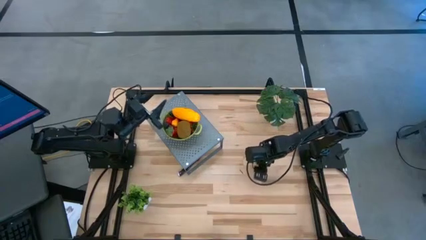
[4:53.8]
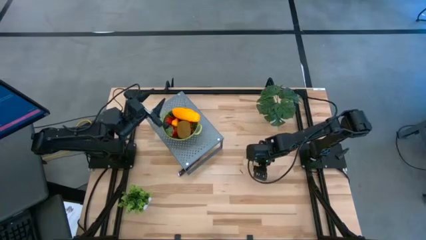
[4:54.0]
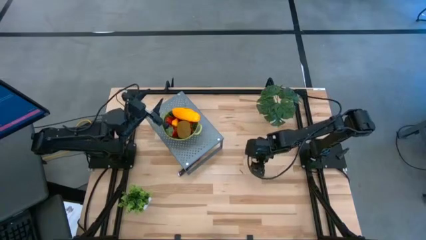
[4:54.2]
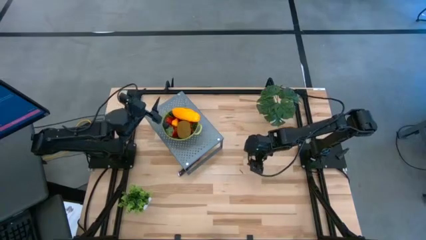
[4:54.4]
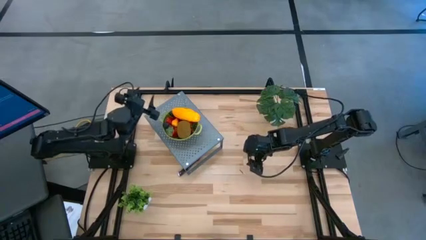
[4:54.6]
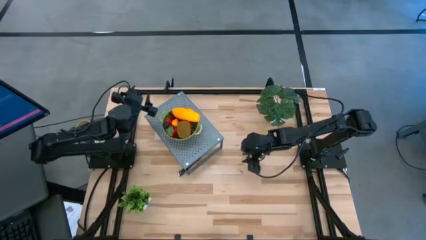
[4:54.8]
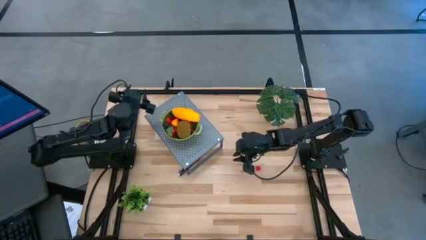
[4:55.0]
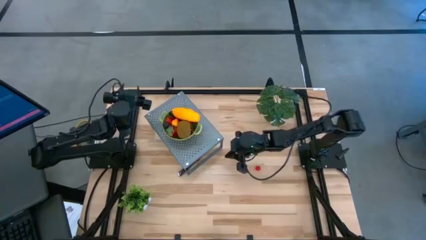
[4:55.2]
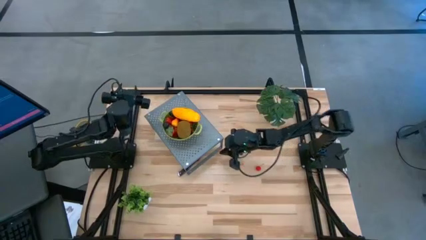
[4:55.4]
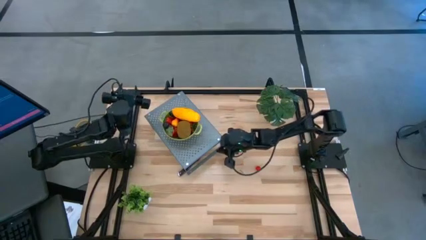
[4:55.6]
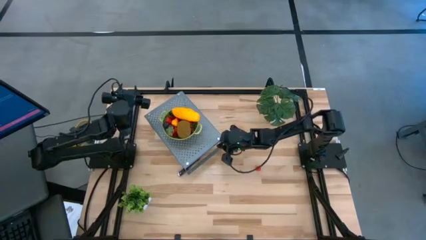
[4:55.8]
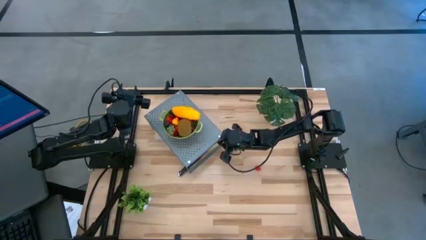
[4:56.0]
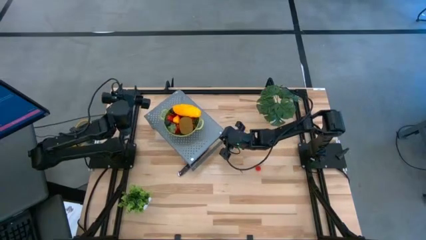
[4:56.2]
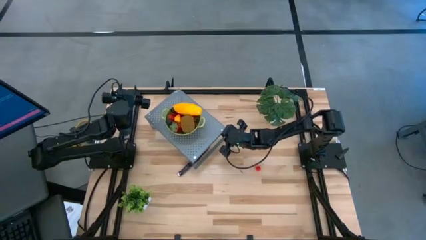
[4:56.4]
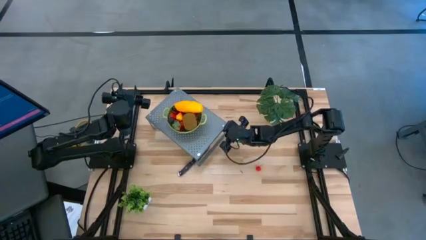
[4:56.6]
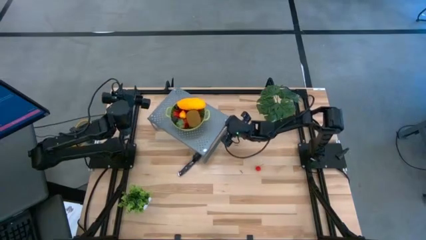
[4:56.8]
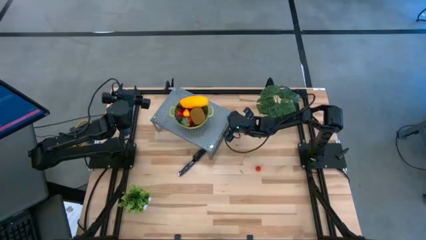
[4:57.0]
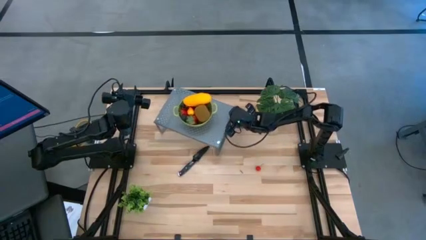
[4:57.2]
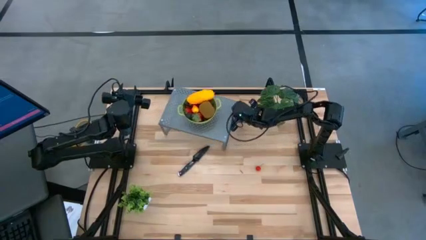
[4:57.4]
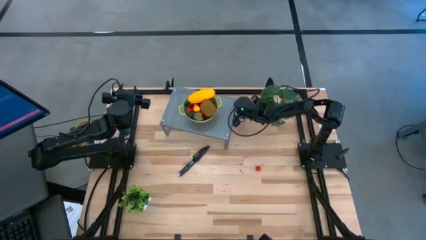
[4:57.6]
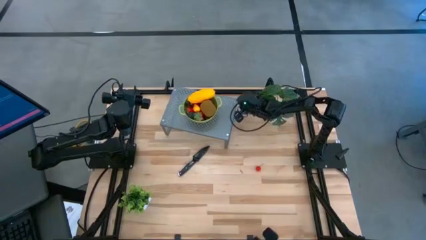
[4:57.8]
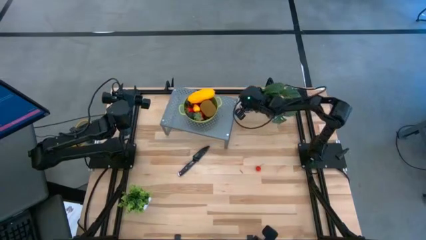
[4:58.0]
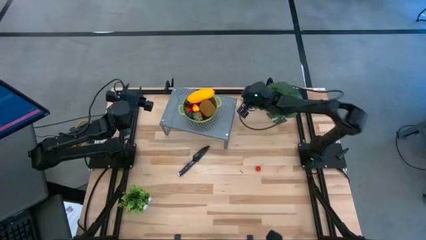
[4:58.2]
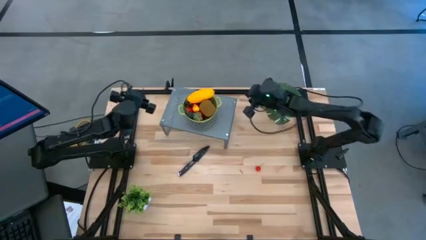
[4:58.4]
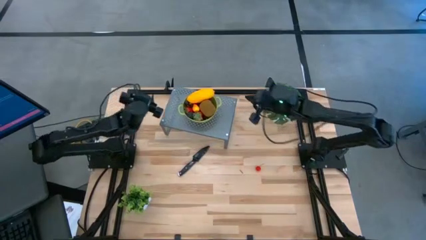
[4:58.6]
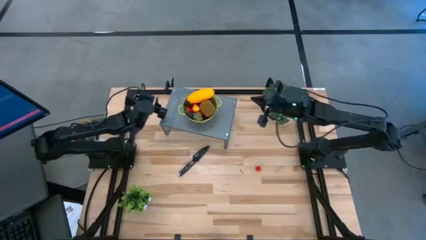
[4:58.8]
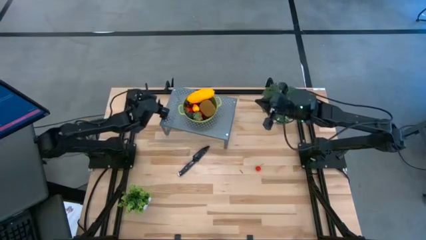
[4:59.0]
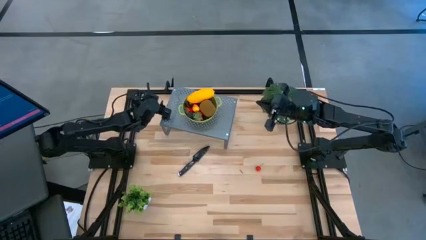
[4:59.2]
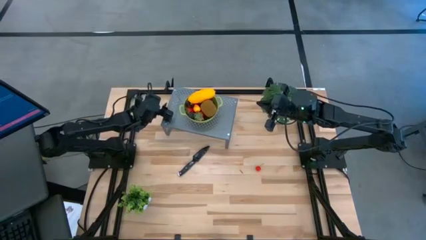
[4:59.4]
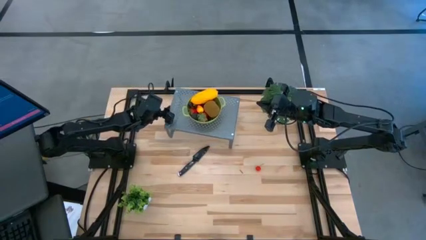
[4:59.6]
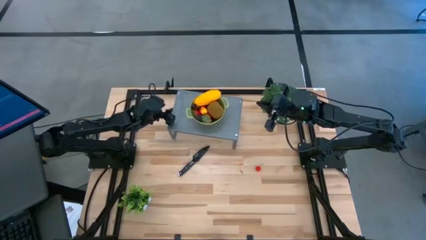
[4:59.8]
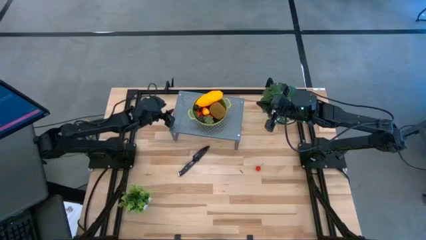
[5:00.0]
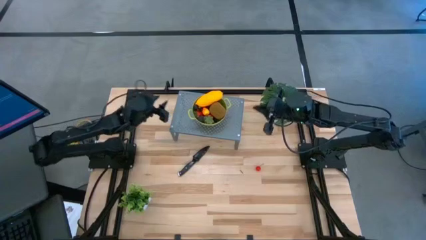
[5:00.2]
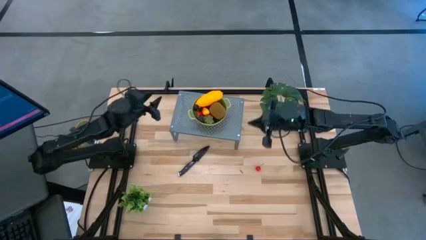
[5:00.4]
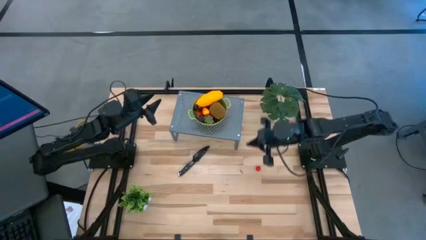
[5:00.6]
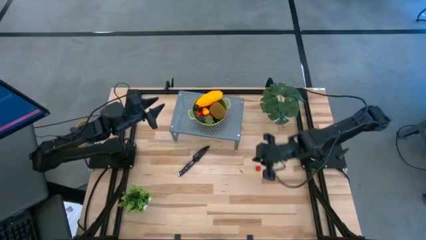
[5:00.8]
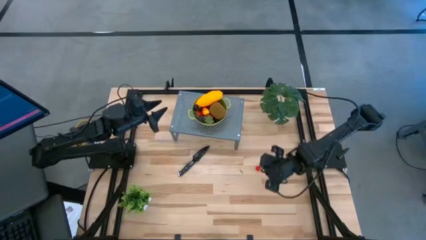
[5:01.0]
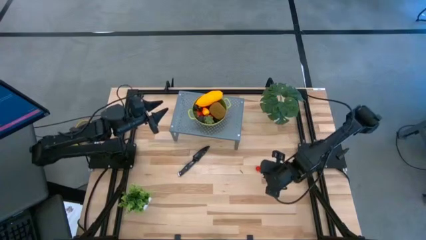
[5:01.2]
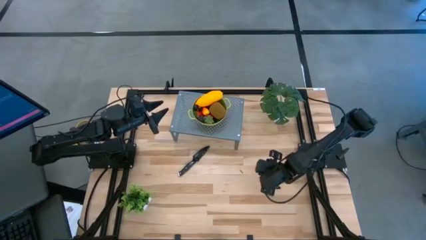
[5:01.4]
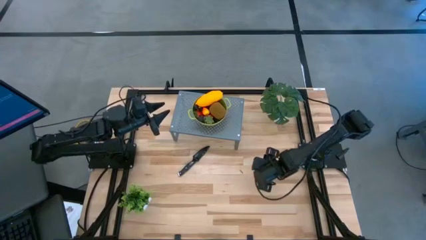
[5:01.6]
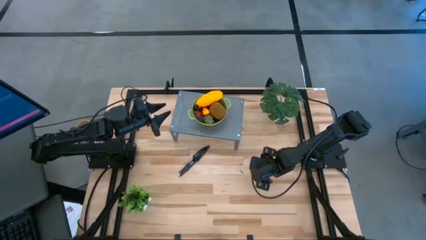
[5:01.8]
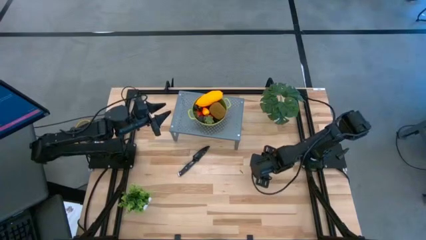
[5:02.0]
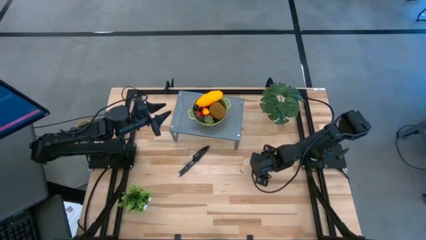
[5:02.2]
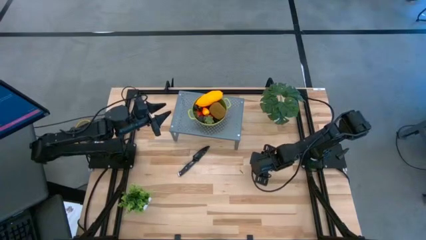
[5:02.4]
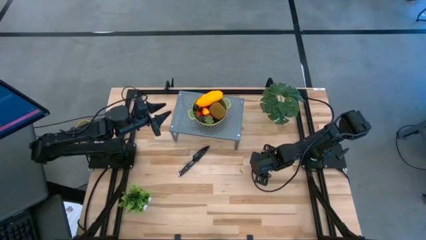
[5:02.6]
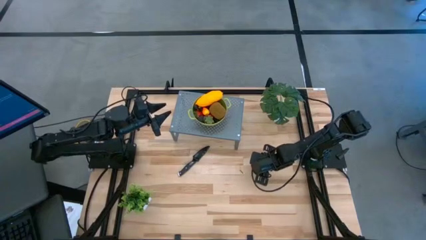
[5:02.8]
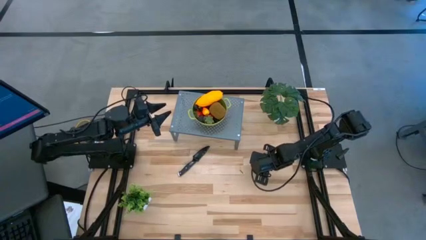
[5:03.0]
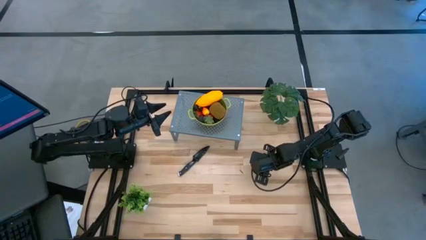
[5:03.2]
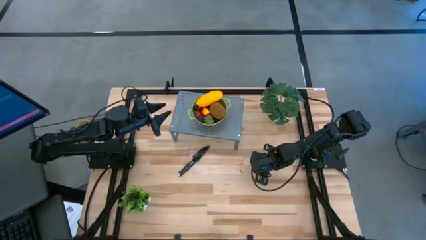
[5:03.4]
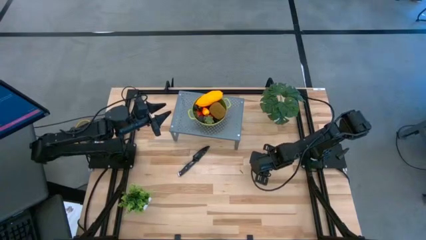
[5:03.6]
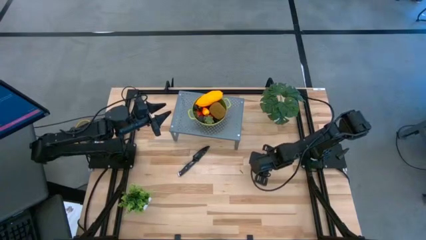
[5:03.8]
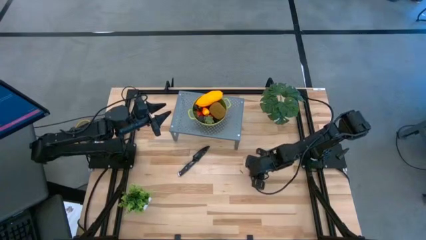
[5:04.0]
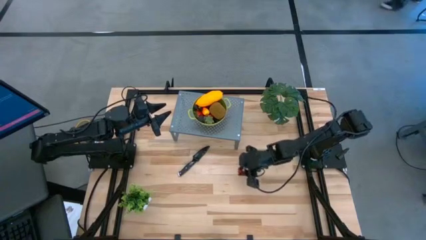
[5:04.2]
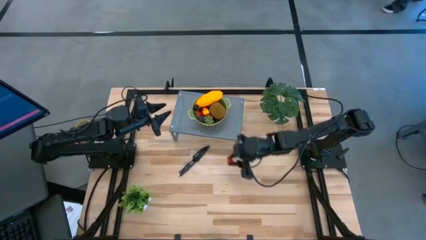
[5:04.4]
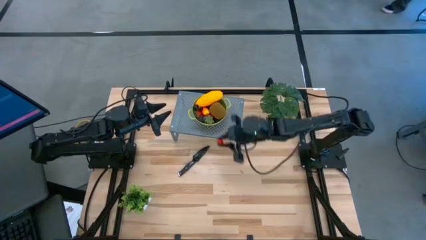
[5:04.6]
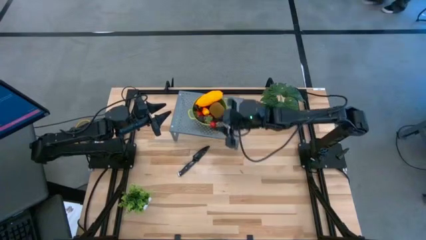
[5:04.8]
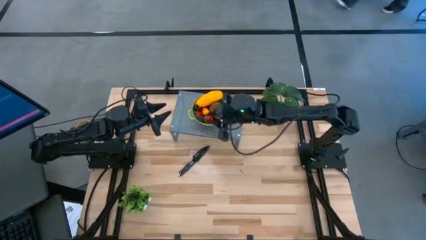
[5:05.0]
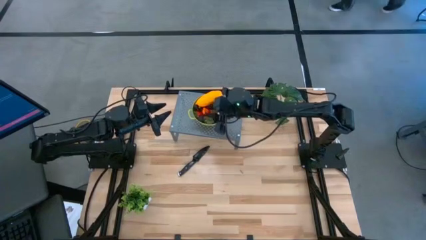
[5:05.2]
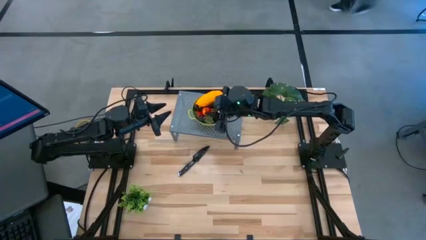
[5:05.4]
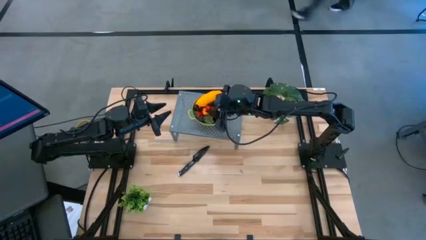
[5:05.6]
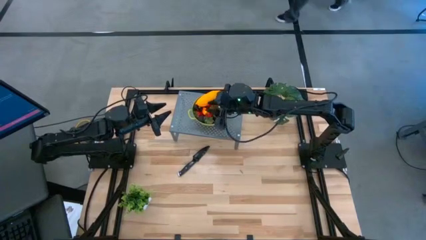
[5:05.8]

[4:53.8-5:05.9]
Task: Pick & Place Fruit
Put the red cherry into the green strainer bowl on the shelf

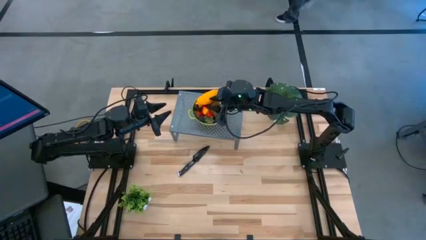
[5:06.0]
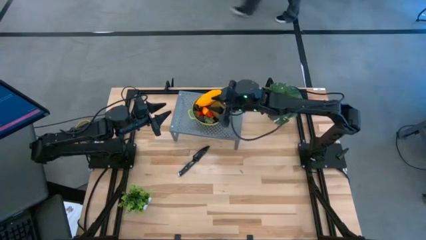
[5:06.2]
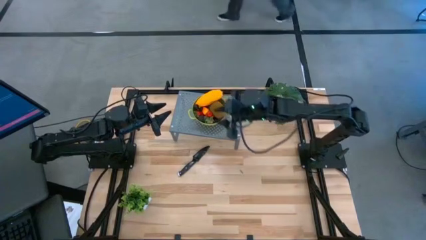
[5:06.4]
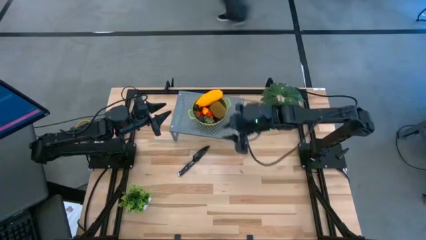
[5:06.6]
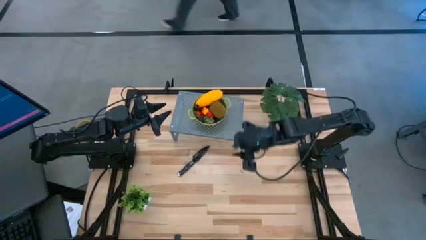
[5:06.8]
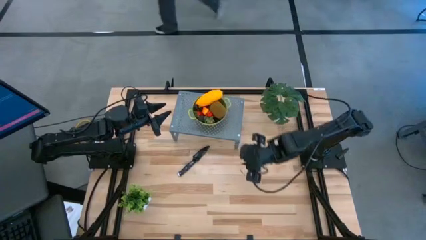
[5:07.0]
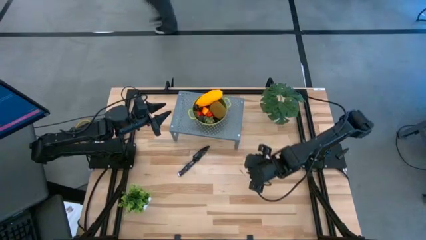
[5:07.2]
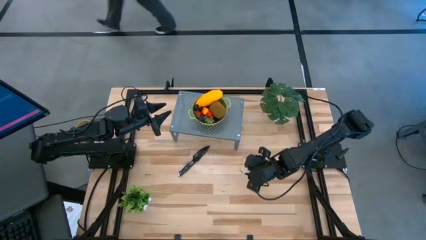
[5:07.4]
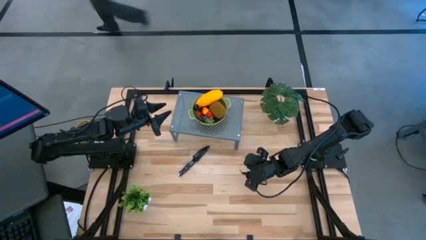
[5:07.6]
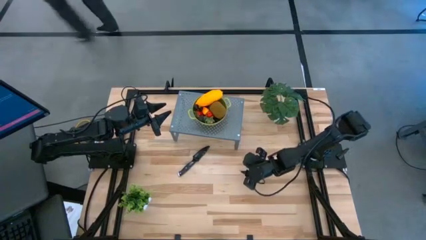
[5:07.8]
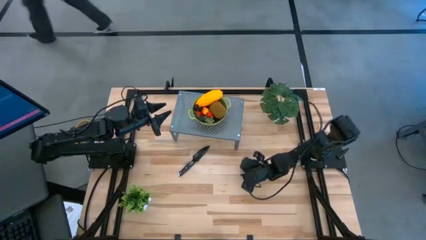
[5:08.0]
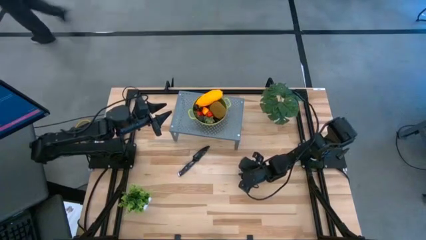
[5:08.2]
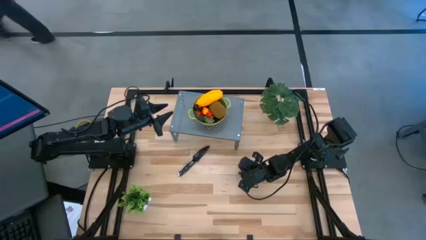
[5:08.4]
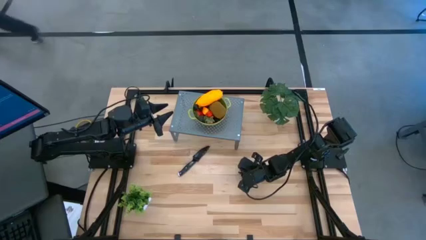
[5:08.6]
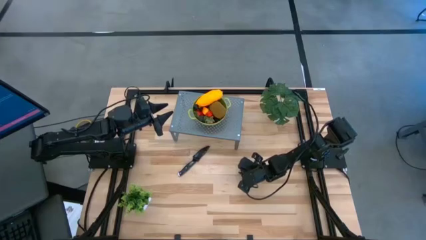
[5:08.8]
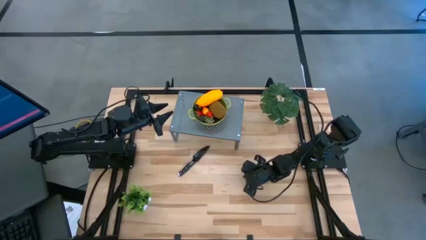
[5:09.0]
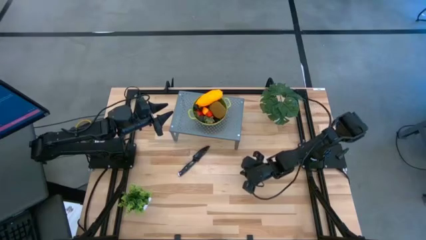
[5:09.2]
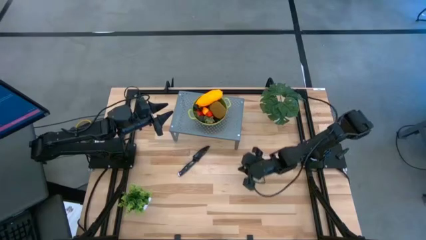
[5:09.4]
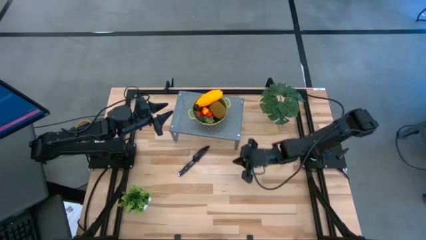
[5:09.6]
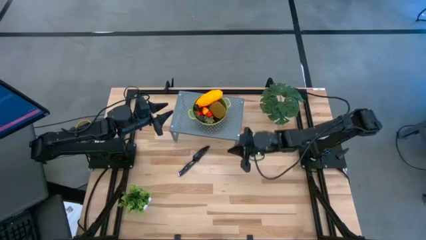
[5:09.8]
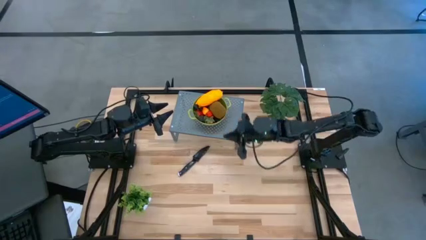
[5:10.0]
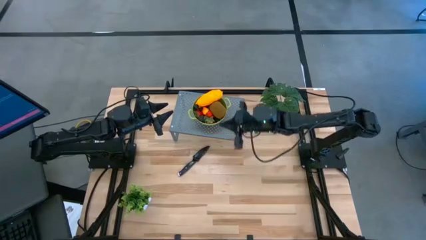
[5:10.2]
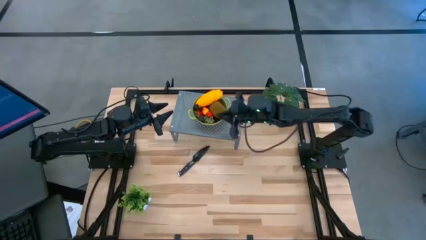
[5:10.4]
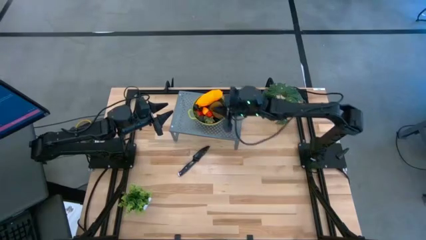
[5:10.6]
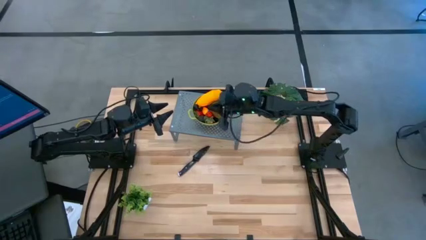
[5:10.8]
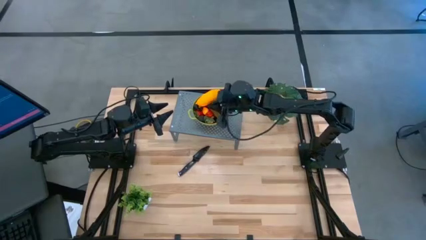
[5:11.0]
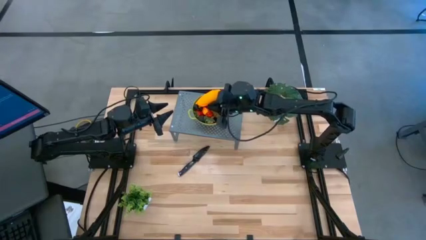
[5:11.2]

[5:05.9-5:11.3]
Put the black stem into the green strainer bowl on the shelf
